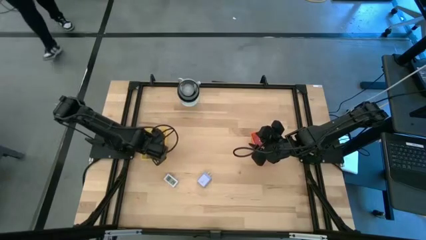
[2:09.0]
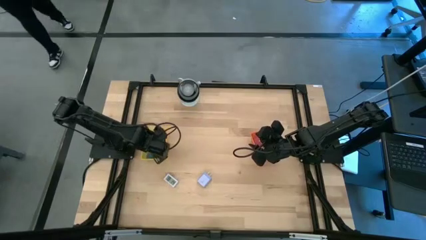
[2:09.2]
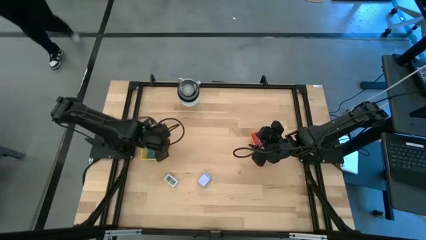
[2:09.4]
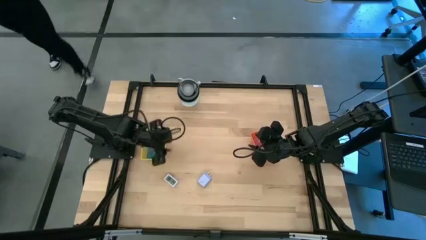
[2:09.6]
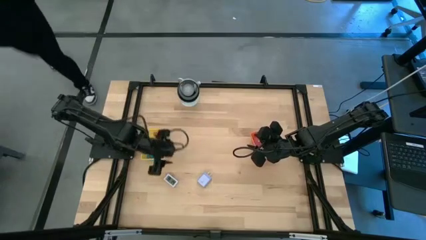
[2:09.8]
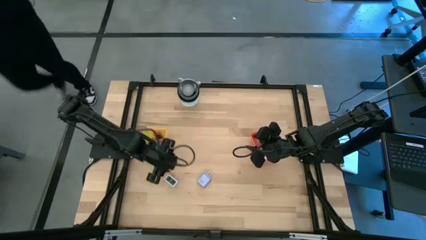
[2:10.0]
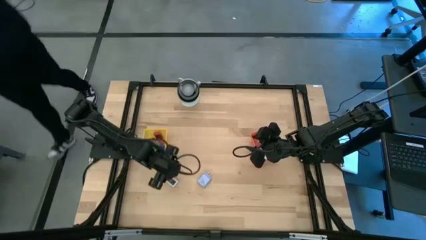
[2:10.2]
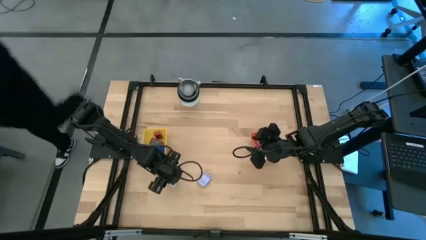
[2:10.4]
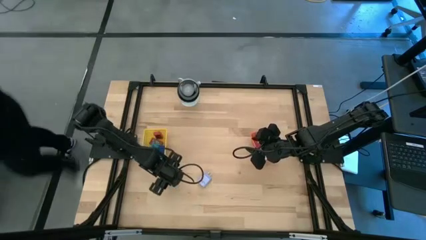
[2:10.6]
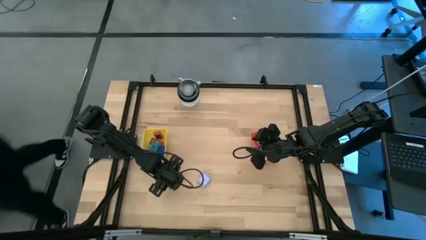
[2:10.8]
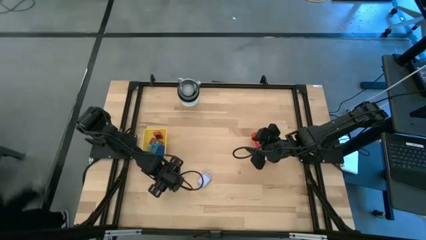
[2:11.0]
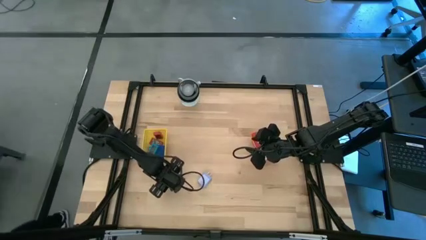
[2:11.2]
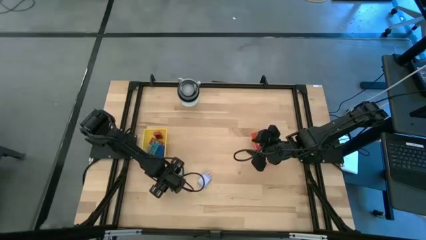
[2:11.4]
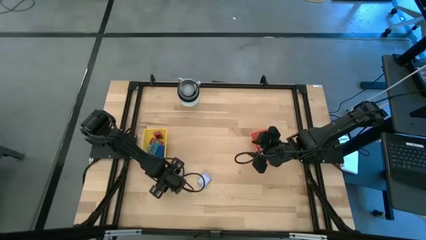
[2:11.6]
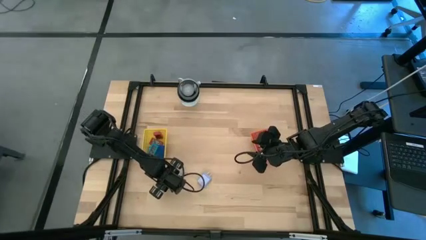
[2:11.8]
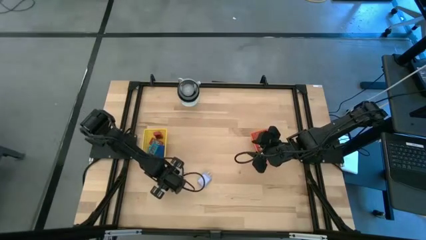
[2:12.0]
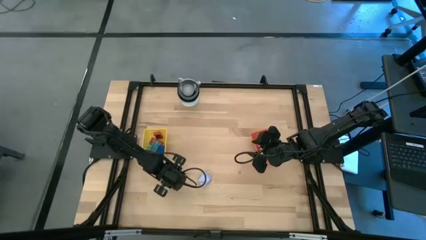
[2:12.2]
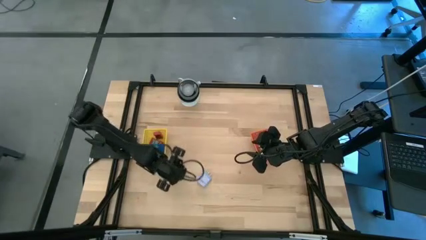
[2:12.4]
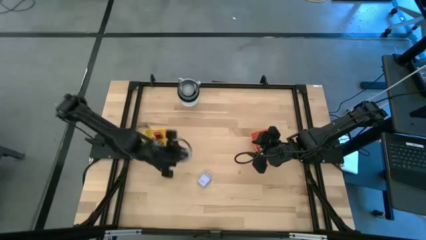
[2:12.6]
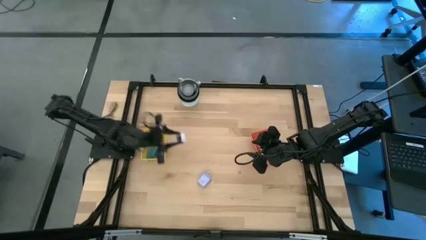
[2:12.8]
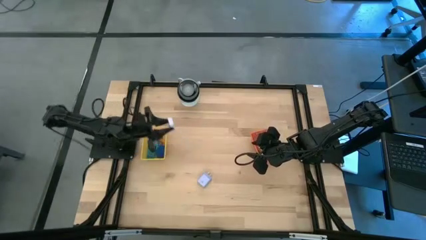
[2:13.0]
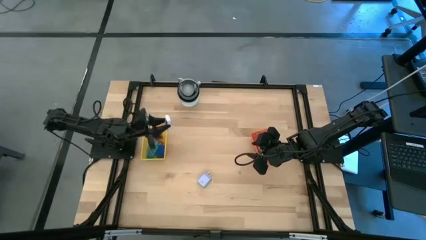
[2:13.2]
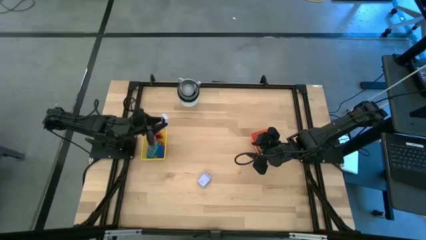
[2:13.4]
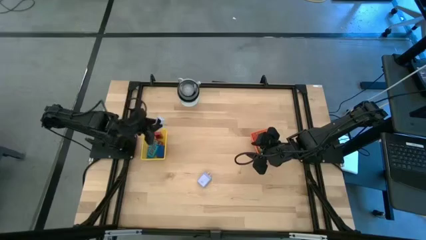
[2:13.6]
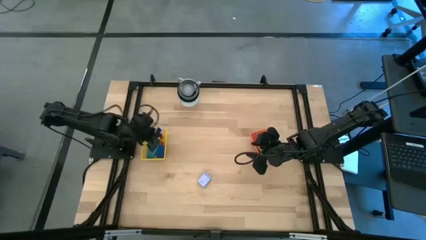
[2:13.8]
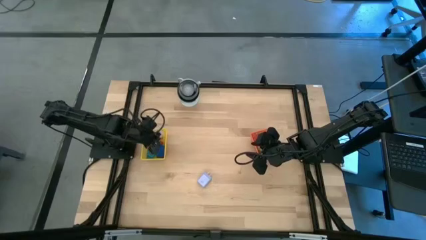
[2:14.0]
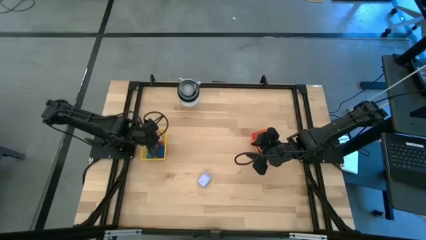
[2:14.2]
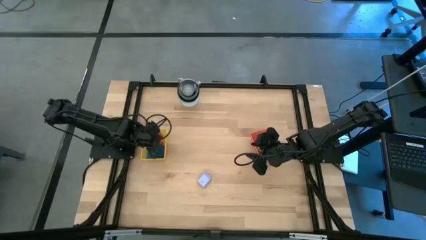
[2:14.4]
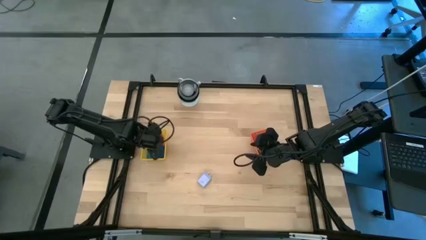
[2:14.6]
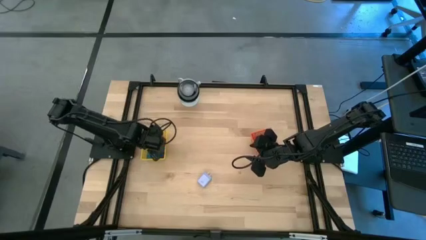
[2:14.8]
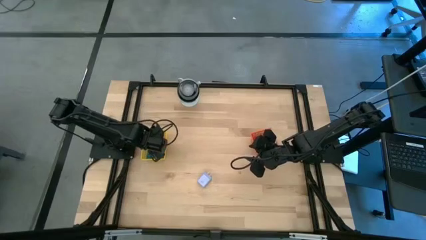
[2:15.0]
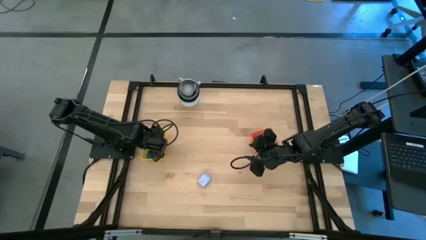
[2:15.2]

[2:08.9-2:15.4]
Task: Pick & Place Office items
Put the white digital clock into the yellow basket

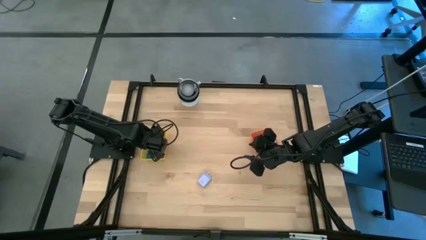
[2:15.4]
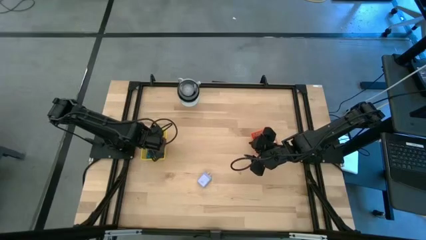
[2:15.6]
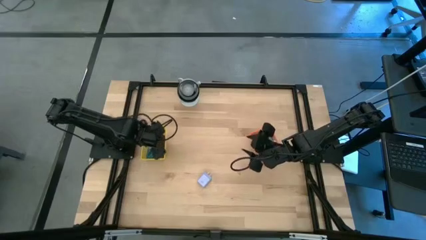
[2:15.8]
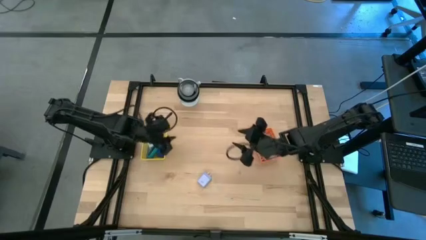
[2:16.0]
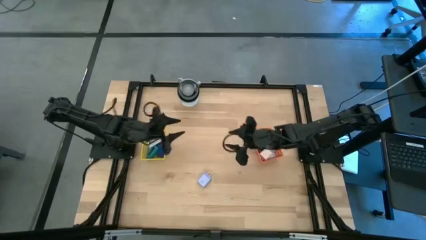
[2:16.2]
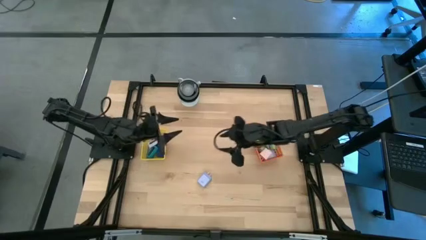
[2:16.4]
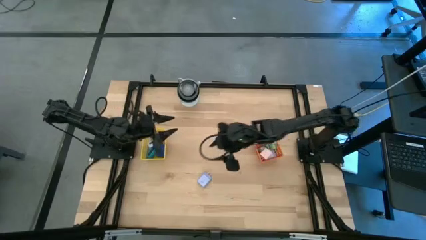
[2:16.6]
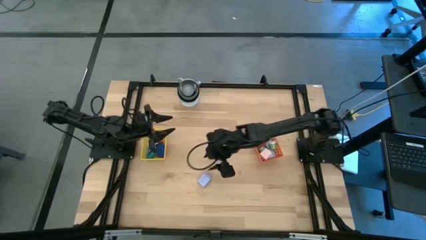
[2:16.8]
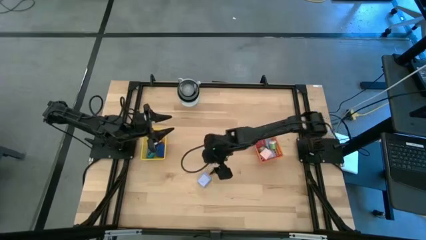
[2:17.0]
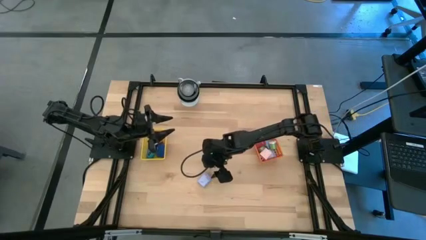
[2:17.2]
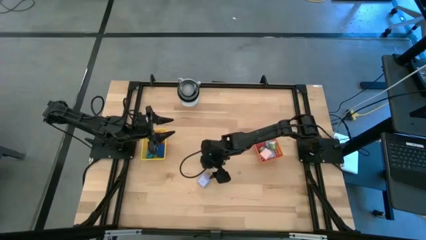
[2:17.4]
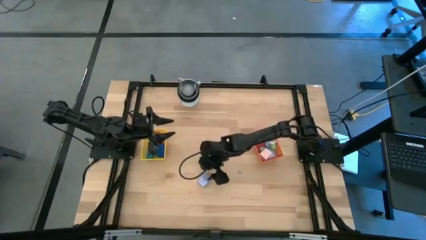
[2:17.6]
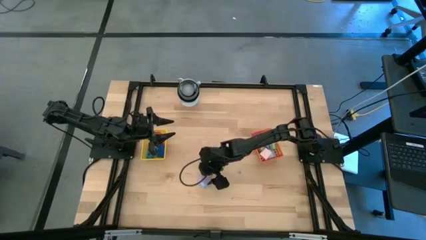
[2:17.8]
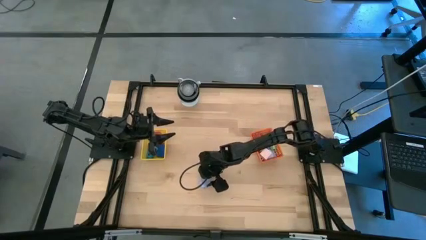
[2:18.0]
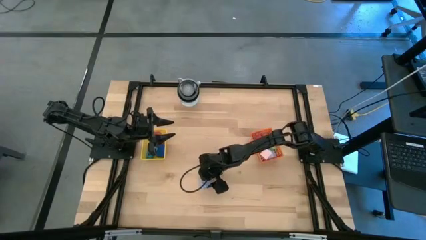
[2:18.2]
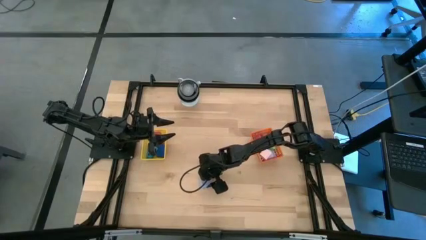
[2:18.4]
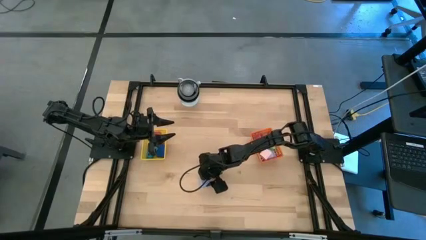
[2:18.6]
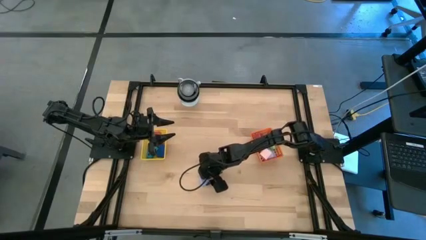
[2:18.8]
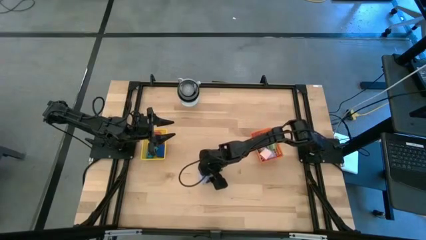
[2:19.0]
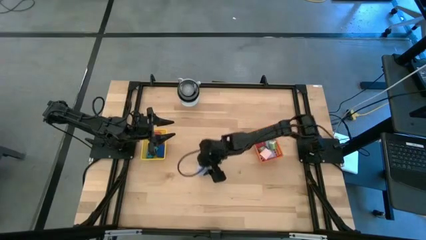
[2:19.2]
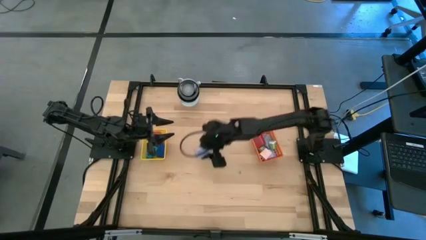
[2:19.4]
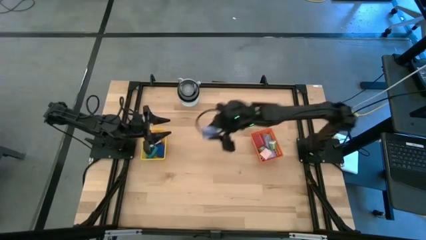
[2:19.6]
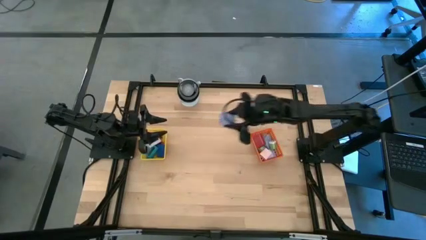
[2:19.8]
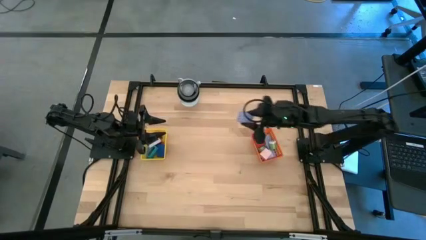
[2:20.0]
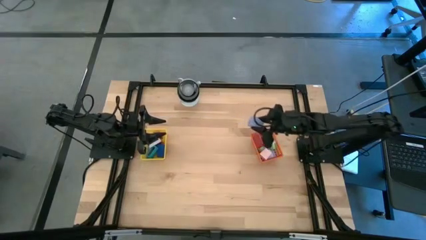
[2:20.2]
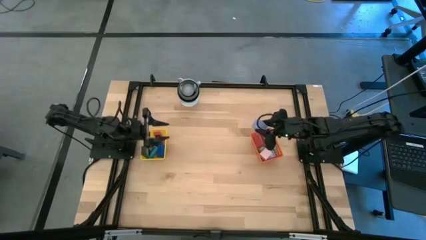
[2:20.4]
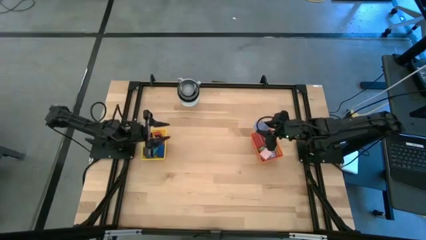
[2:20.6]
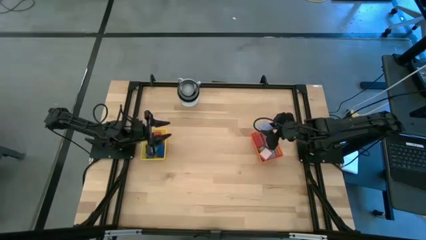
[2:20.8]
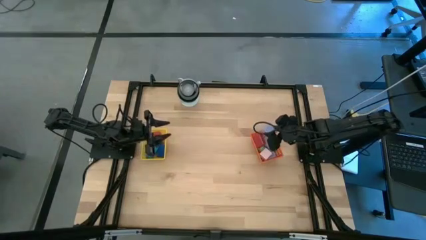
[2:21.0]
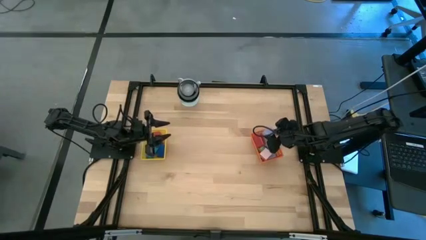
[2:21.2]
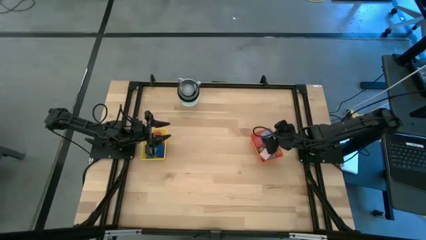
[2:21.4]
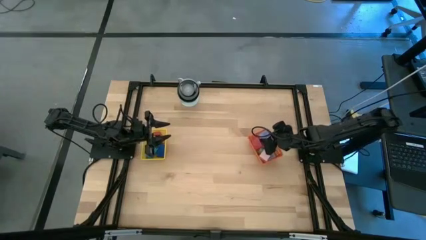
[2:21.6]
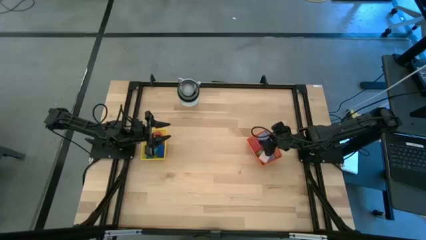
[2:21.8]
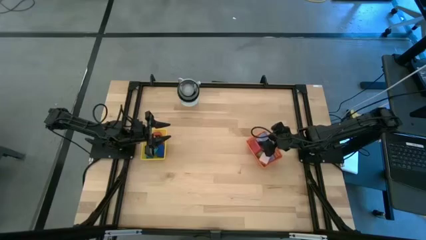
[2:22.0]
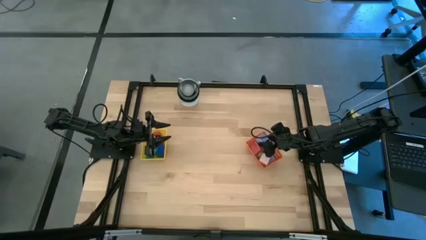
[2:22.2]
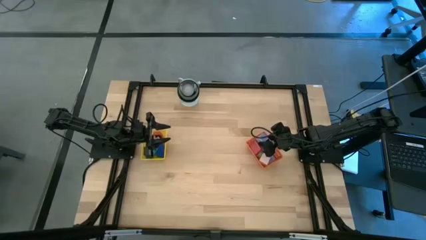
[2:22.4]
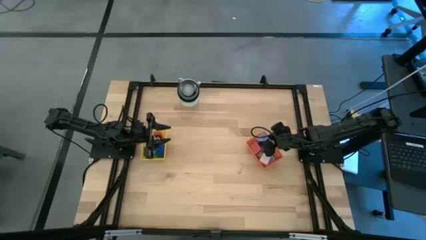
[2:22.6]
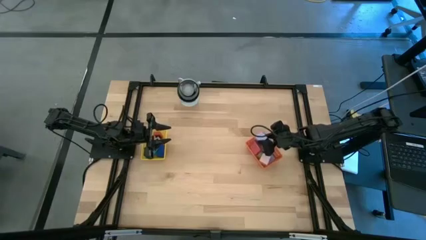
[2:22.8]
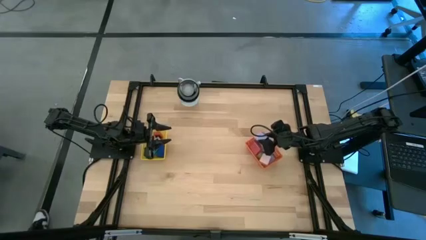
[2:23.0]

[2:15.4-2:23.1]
Put the light purple charger adapter into the orange bin
